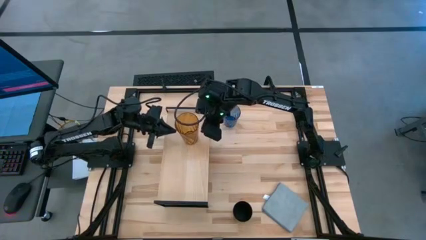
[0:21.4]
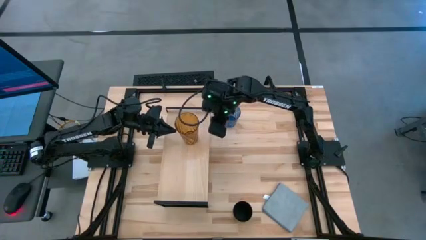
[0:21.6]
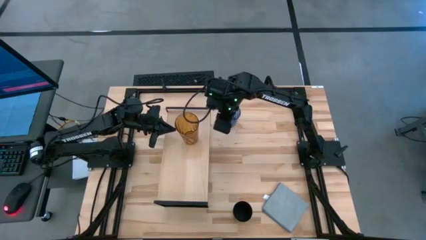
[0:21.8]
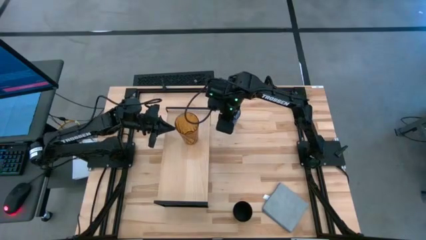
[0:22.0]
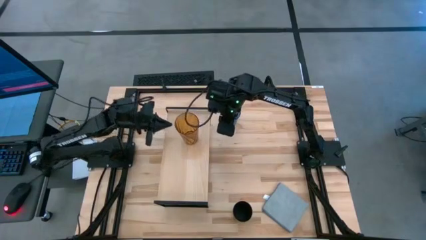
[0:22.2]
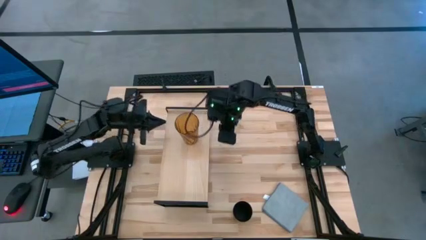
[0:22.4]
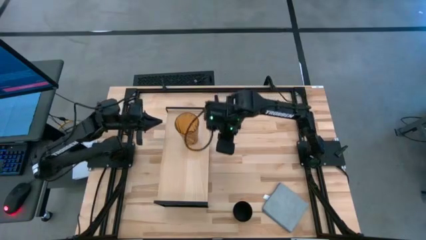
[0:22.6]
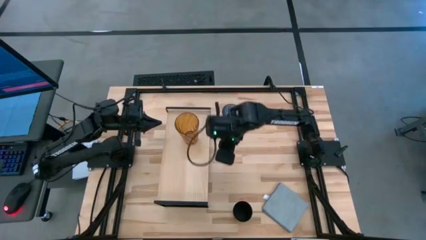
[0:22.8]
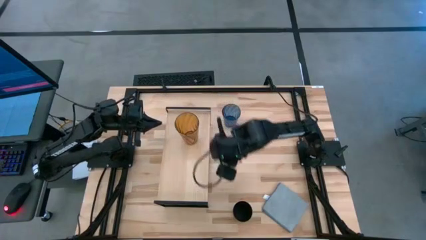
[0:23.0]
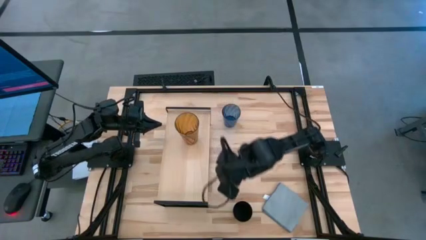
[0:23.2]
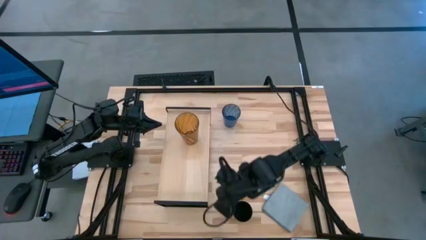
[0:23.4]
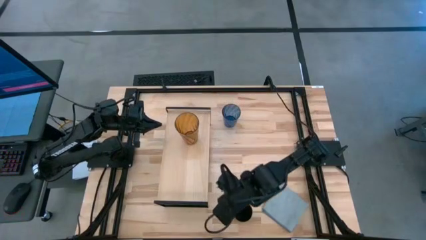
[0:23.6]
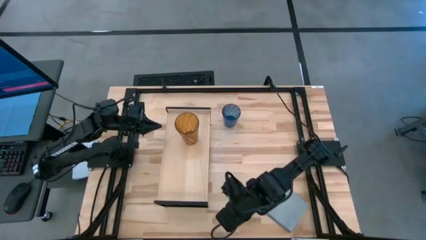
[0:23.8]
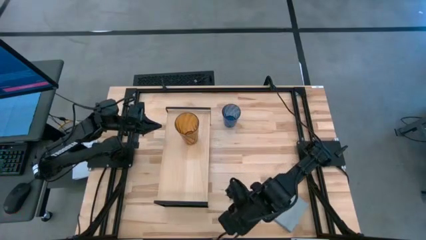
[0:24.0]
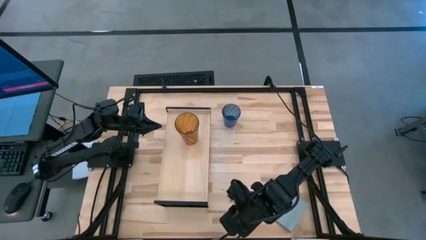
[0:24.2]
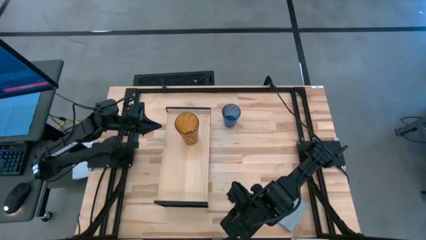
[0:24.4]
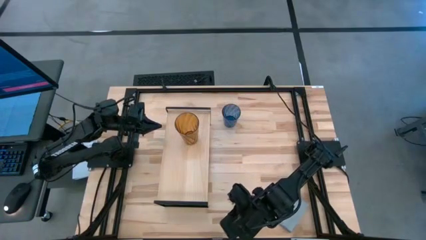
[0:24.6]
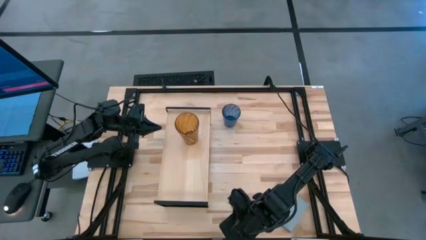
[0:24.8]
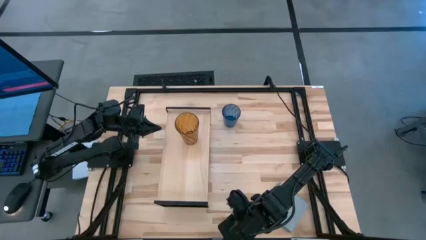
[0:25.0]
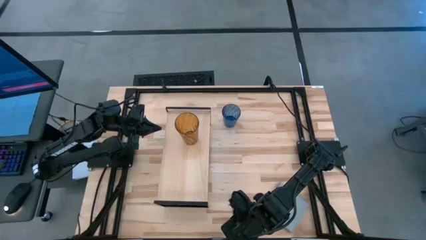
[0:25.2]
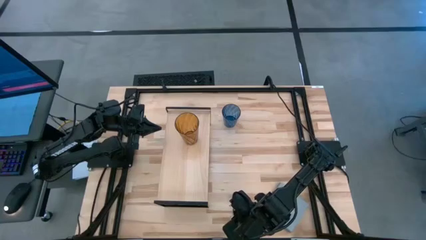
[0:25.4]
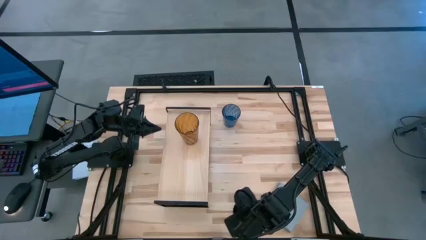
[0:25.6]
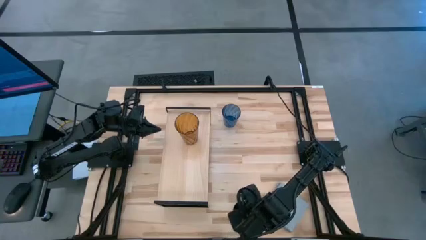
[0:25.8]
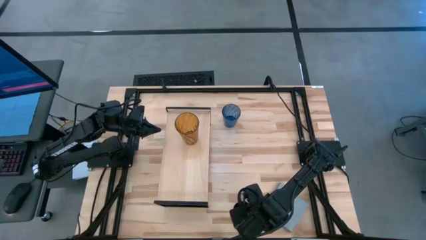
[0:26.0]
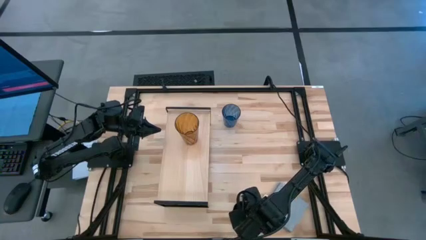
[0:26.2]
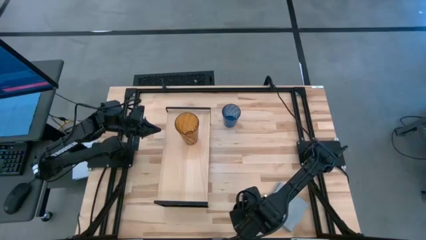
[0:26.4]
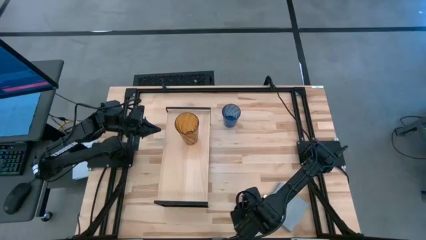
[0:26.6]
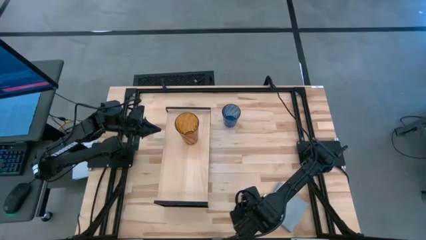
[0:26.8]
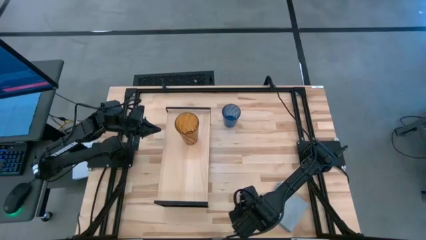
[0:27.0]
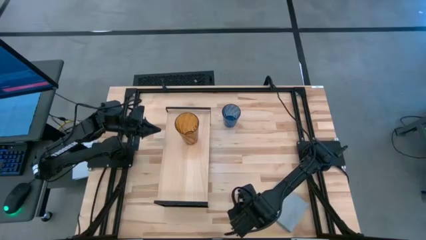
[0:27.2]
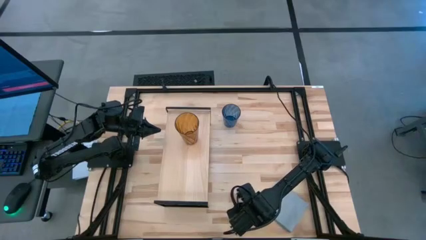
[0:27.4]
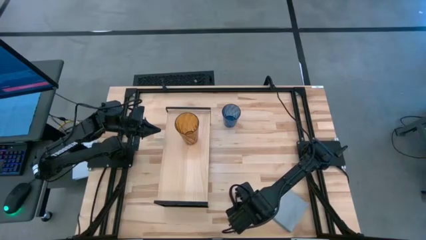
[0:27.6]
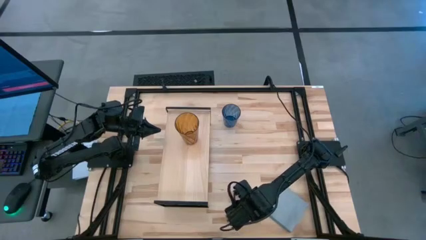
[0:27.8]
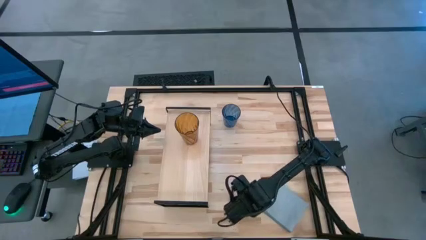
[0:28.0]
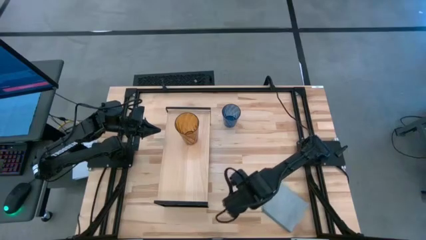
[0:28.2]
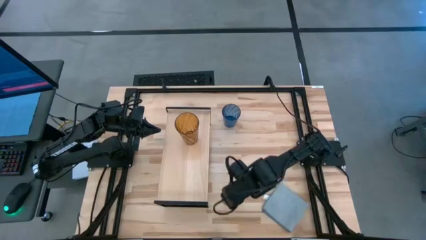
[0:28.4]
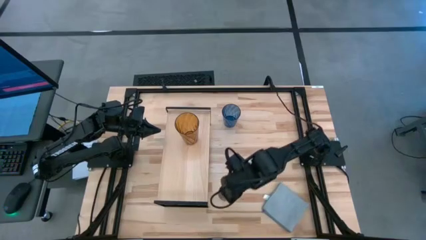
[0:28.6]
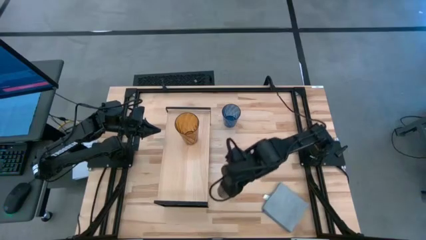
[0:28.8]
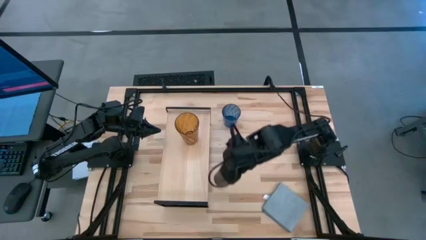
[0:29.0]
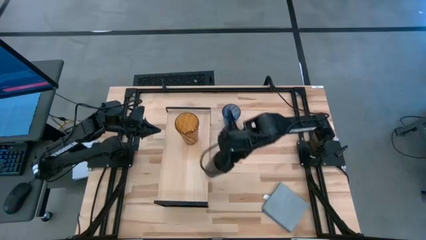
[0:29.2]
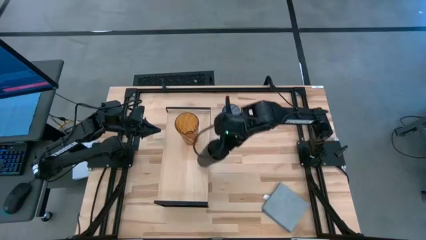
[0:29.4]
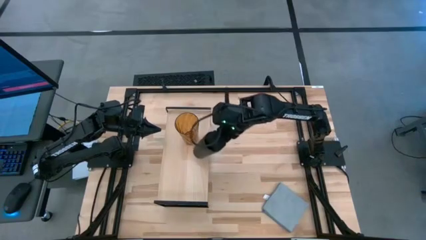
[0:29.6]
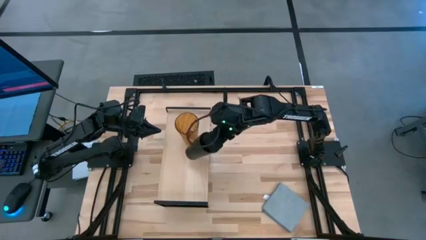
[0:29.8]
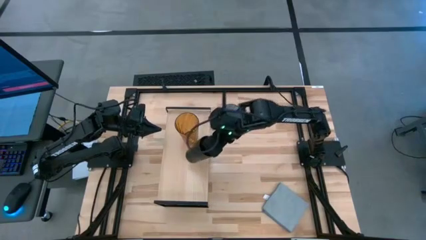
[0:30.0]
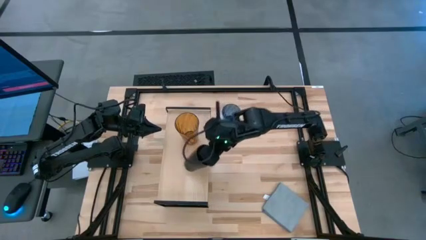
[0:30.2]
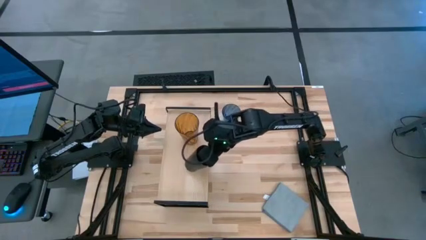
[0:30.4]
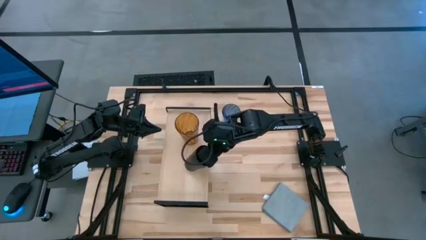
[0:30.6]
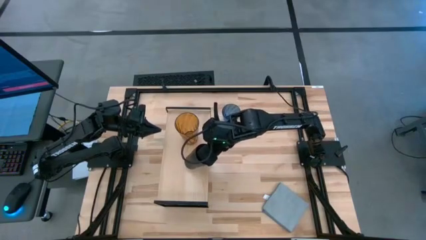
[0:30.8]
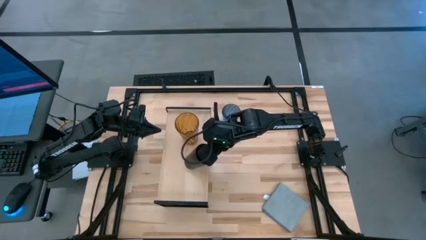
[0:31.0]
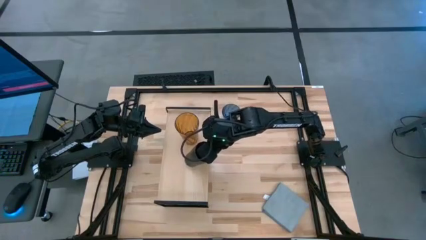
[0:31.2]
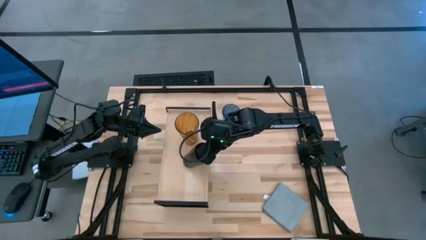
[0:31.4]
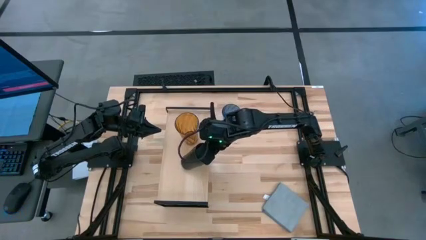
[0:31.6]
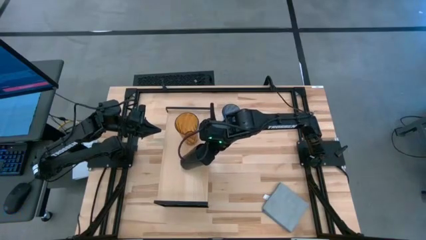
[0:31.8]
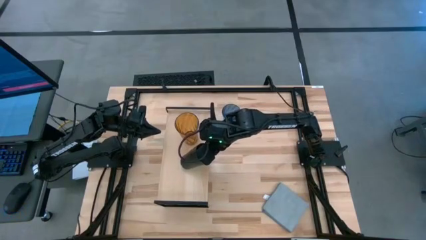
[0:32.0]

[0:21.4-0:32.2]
Task: Stack small to large cups/mugs on shelf
Put the black cup on the shelf
